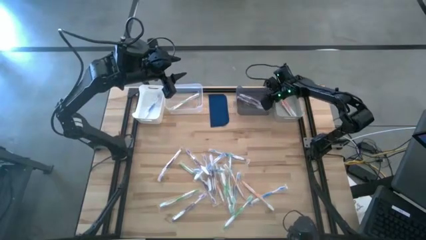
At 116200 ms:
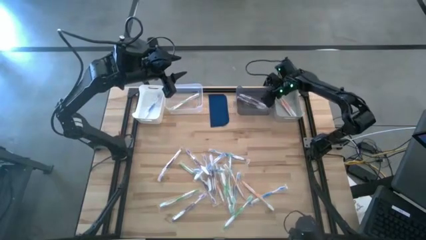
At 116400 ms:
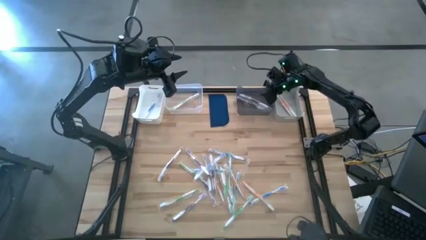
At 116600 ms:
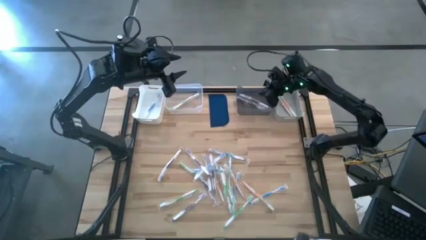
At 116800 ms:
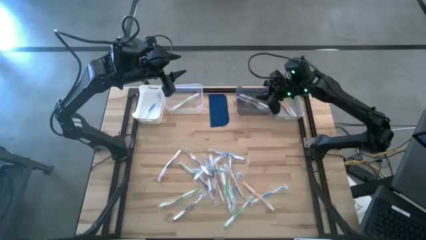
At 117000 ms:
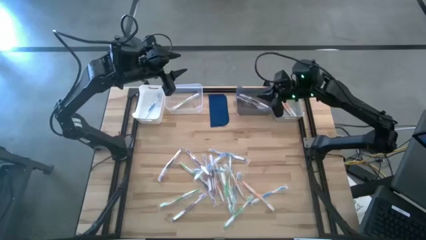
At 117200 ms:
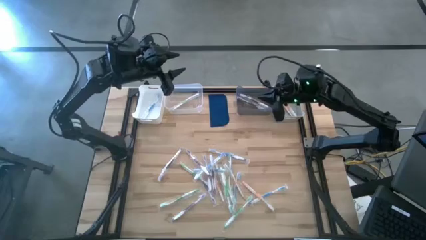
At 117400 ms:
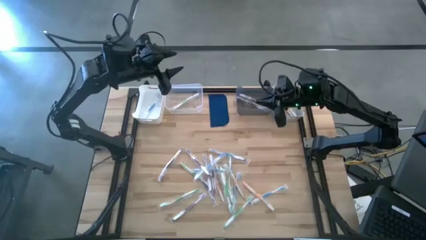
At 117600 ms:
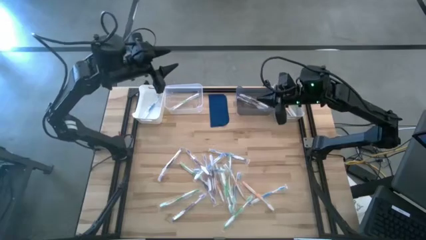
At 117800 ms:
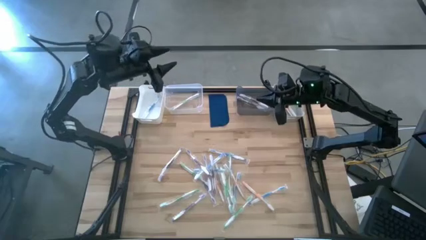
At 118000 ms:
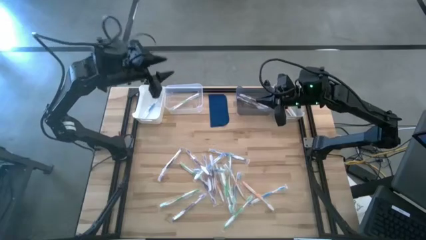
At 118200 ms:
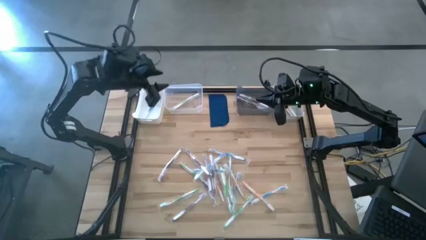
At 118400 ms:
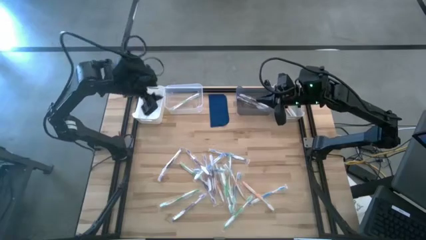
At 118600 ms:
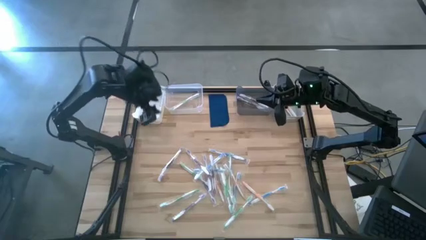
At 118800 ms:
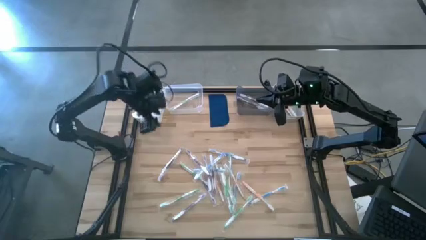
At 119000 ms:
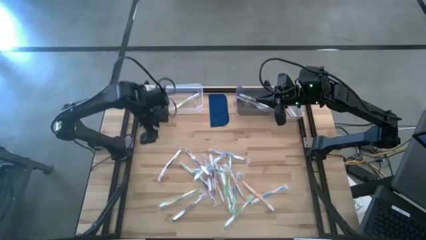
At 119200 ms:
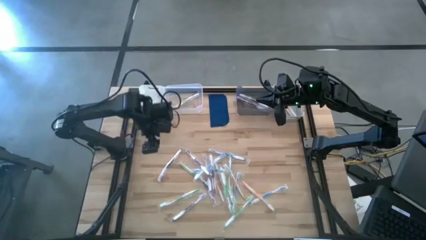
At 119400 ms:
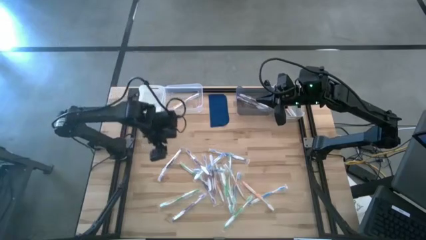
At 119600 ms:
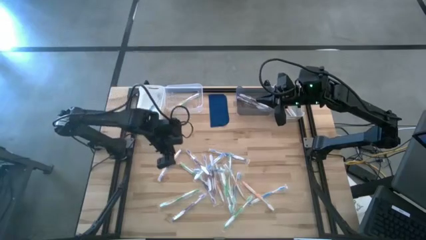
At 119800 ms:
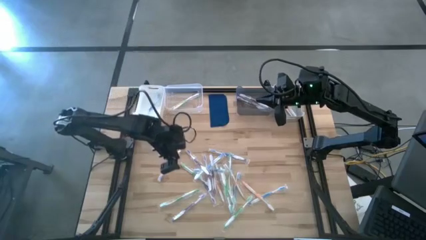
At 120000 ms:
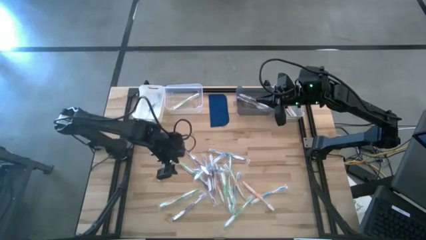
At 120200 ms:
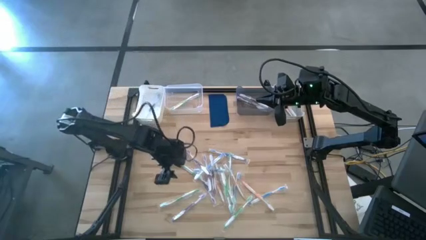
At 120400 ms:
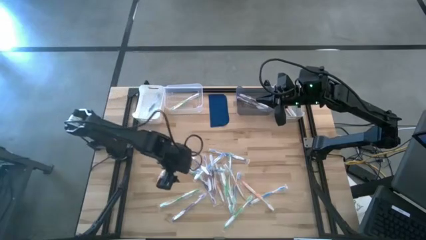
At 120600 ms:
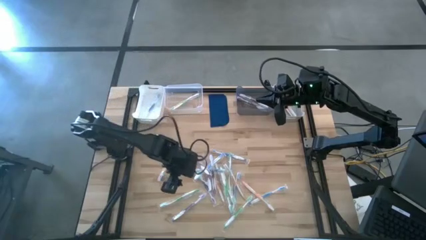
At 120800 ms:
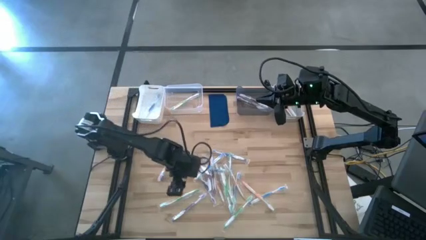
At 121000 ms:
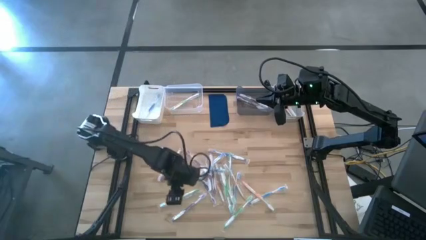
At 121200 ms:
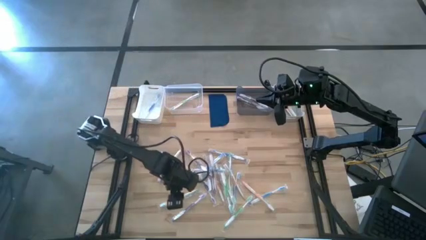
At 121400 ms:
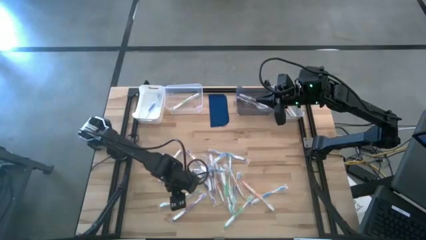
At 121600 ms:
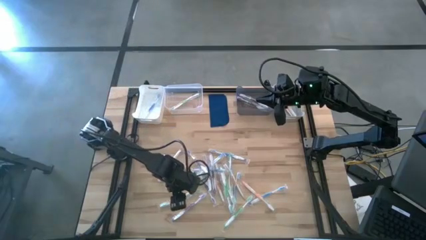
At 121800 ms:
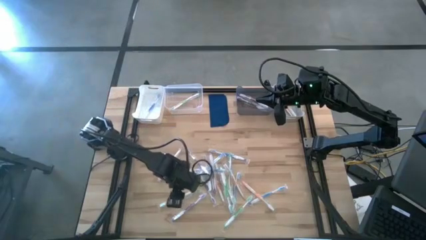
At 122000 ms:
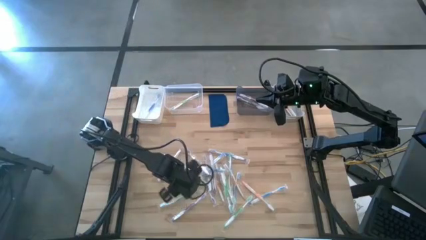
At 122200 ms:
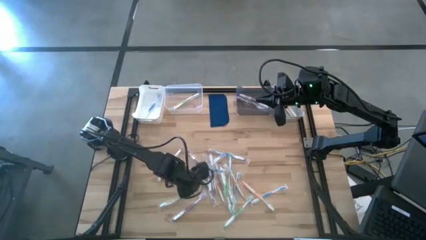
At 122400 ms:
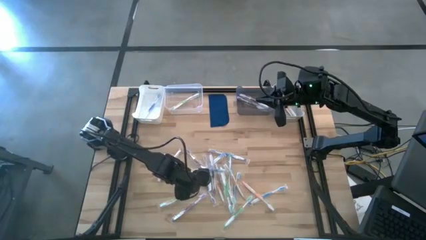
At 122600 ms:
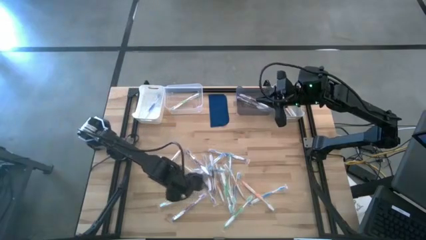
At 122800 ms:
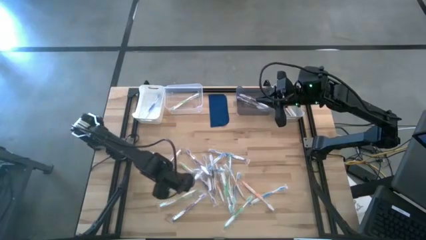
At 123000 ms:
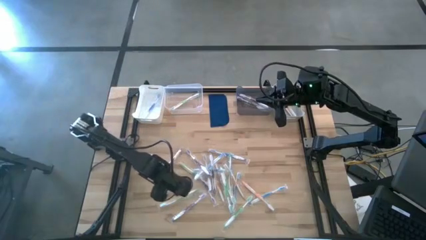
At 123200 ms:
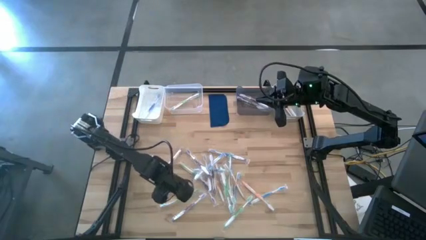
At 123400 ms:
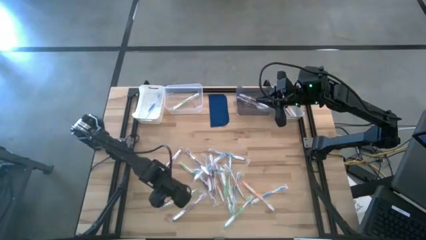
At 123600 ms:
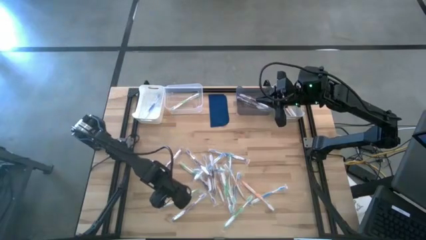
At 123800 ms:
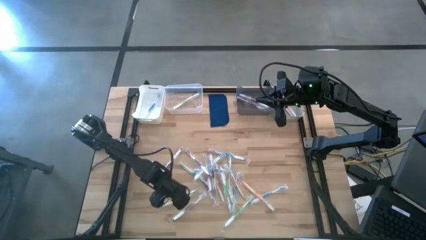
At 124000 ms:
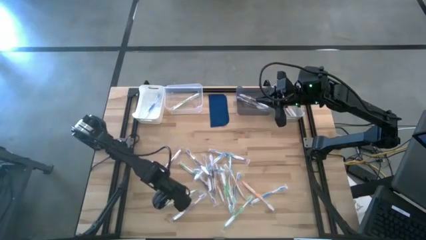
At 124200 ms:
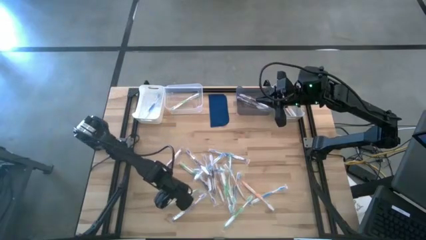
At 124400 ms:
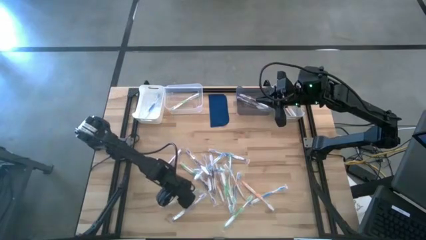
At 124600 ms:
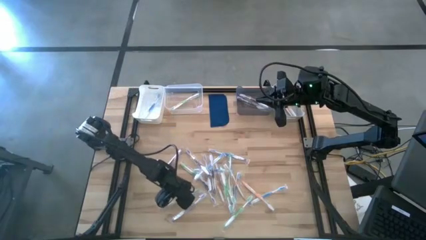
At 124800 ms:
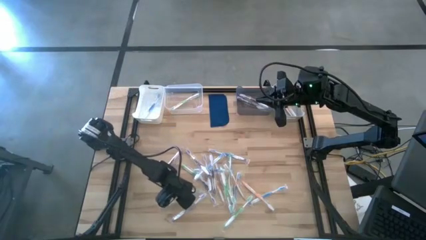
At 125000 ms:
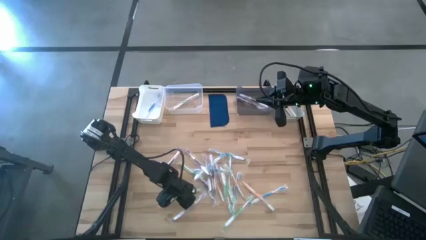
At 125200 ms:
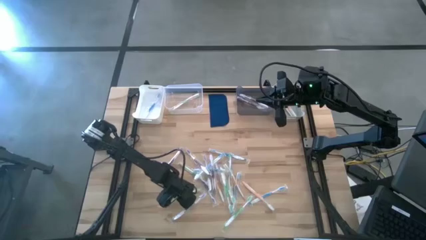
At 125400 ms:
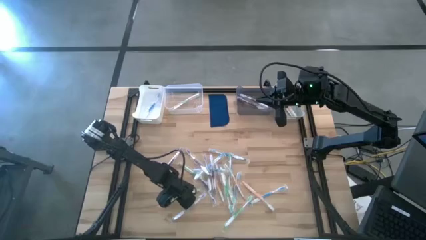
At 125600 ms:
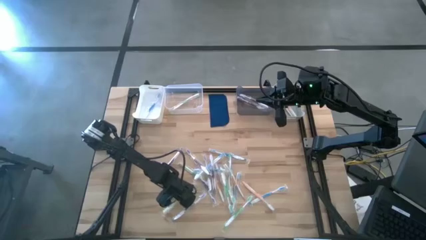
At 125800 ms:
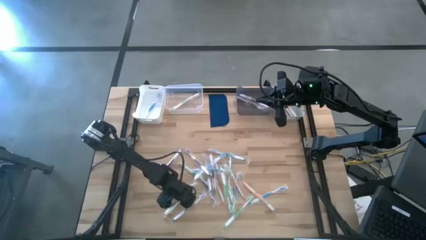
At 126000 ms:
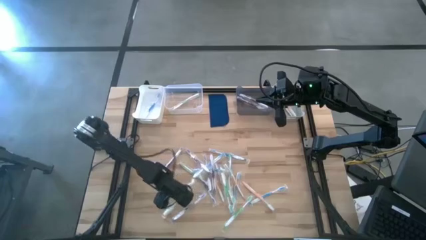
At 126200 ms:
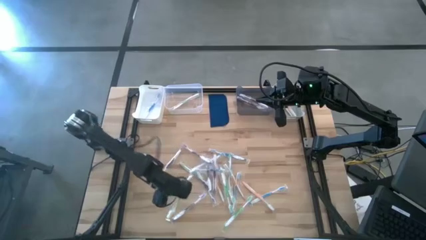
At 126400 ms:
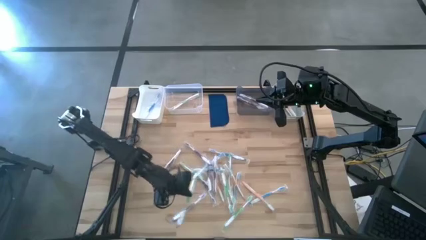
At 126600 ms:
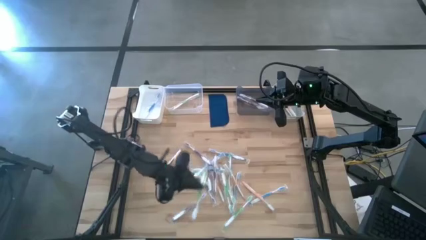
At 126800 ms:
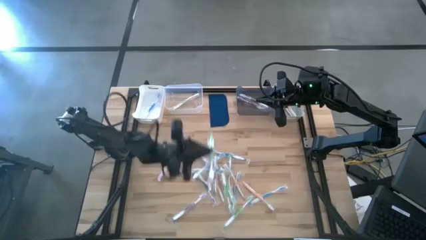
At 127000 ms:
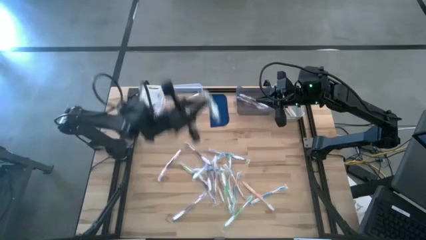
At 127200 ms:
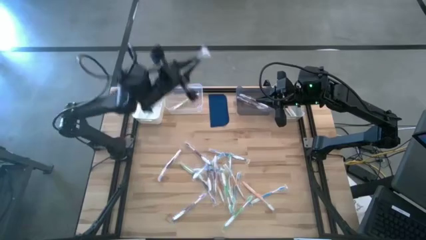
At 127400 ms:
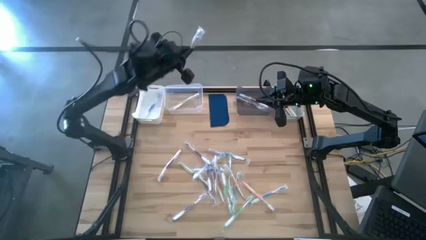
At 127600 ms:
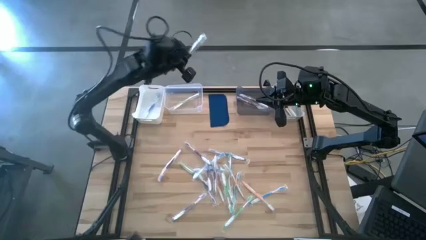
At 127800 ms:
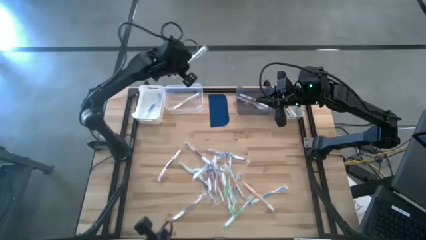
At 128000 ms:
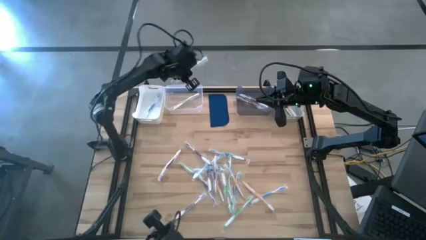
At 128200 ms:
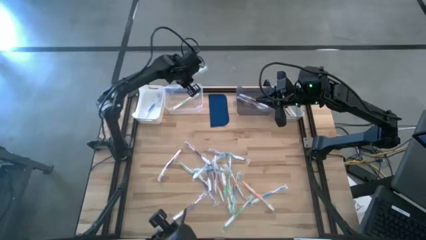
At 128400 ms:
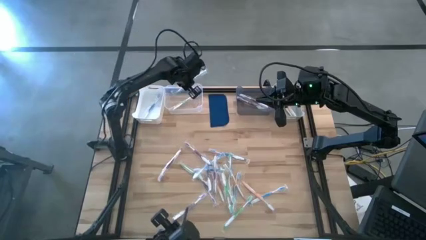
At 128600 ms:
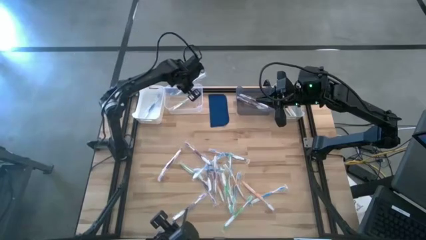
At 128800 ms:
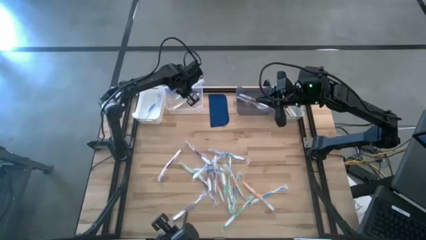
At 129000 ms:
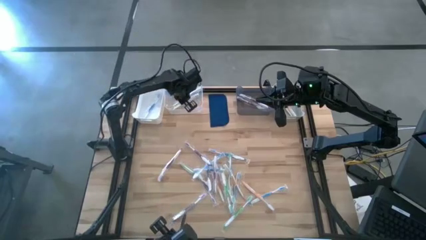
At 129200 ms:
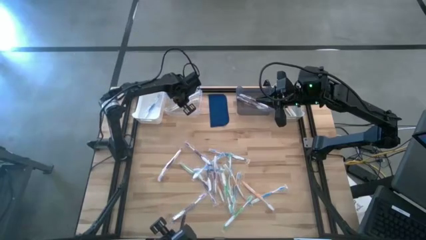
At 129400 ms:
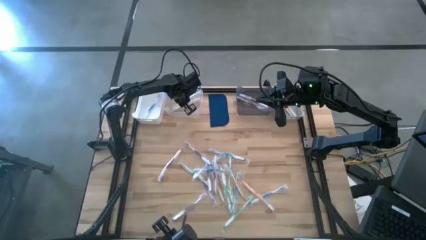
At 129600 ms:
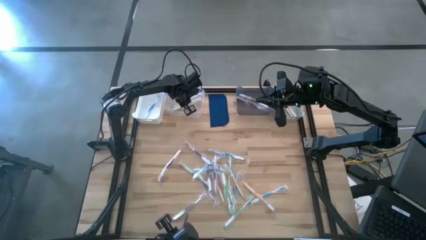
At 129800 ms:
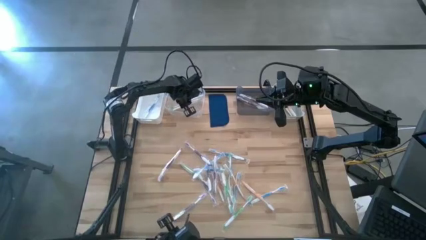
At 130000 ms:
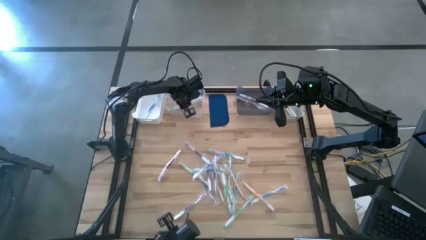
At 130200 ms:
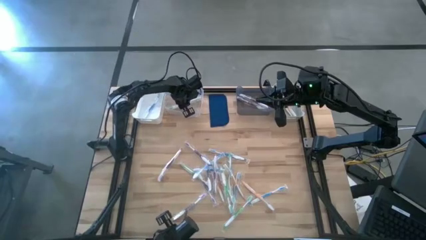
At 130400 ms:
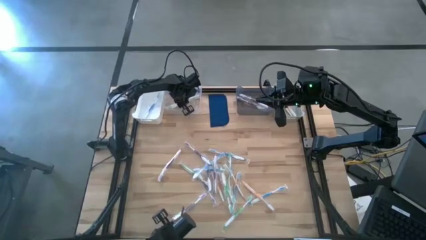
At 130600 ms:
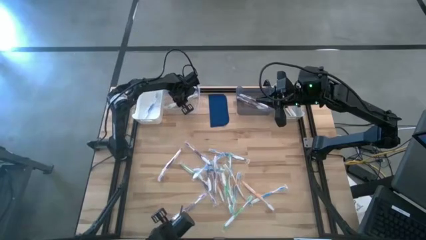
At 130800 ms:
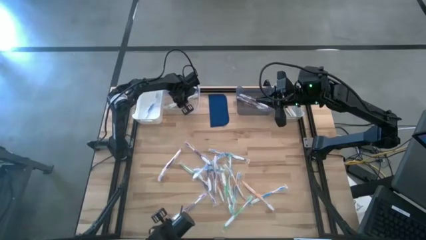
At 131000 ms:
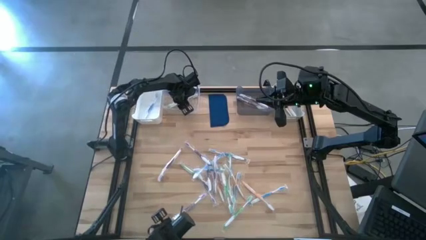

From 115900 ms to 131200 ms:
Task: Pick & Place Toothbrushes
Put the green toothbrush into the transparent bin

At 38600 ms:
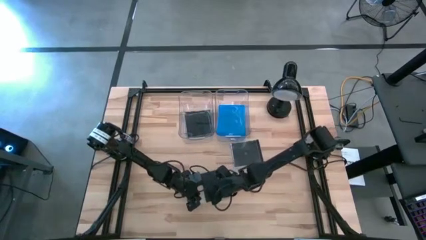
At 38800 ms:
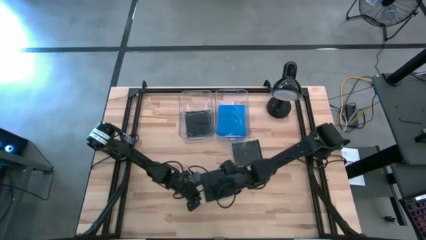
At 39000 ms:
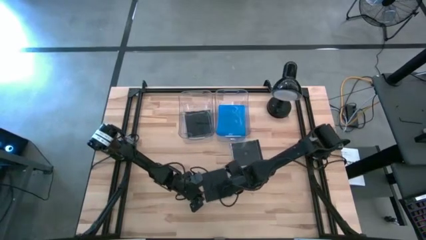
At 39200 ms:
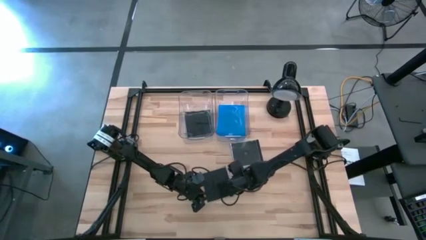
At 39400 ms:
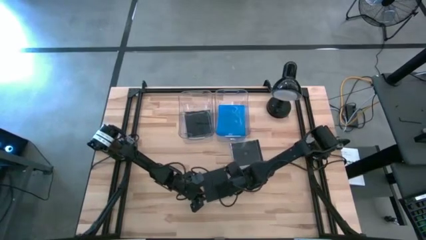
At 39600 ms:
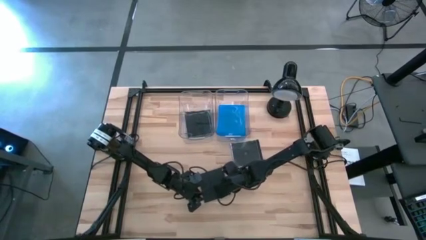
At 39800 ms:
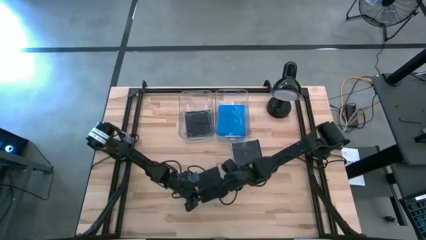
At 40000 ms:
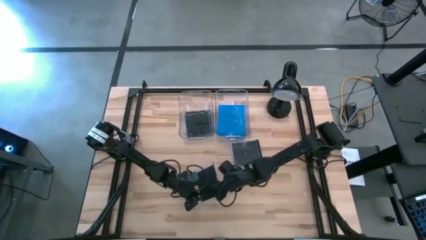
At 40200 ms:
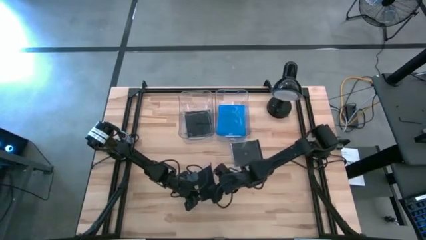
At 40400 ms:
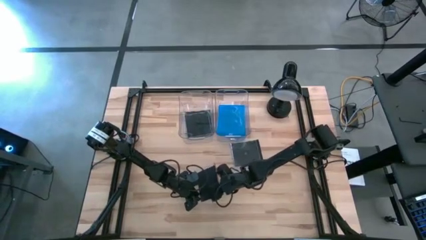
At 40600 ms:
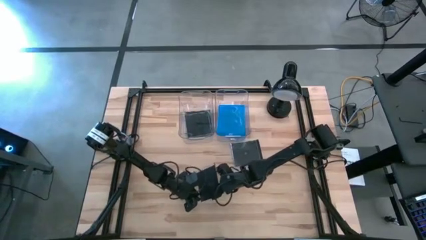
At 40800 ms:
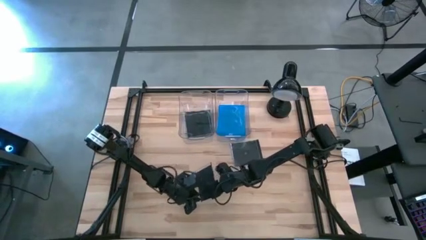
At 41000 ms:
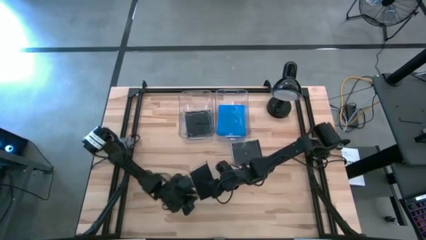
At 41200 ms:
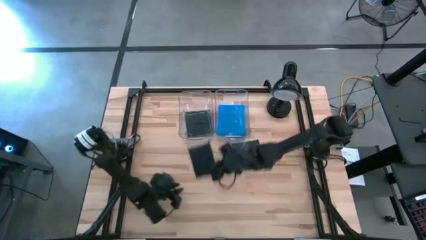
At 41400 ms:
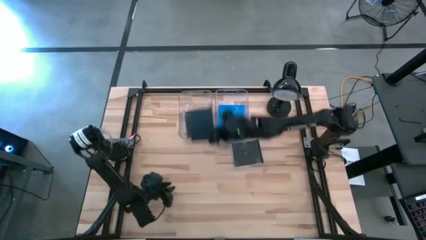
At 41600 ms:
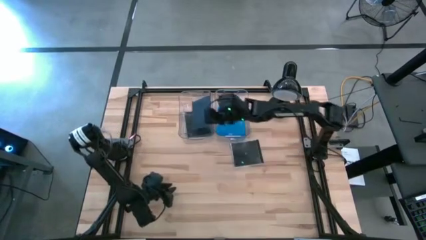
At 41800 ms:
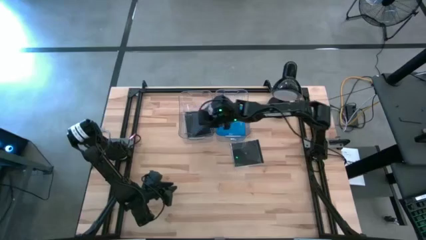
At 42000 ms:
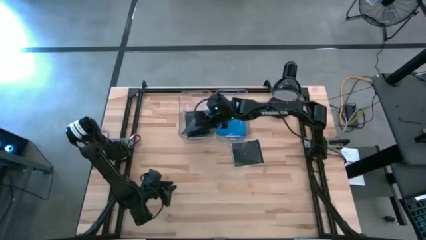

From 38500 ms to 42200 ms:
Task: Pick & place jewel cases by type
Put the bottom black CD case into the left transparent bin
